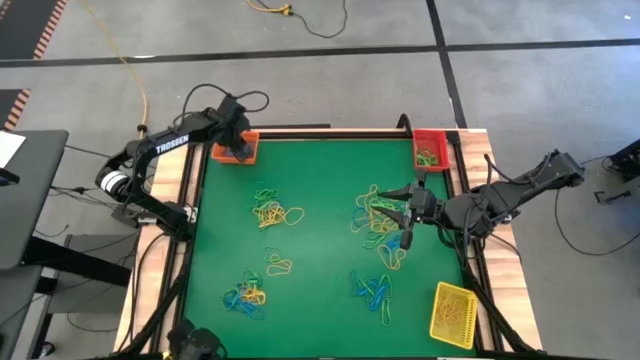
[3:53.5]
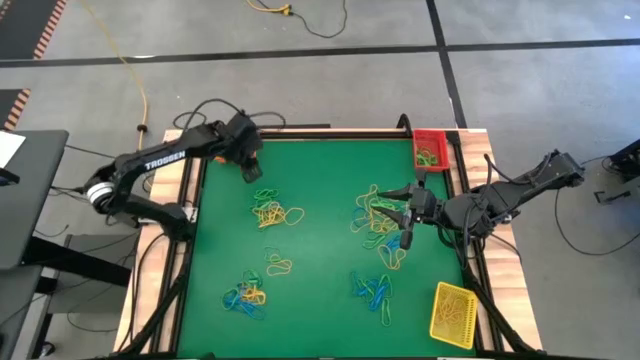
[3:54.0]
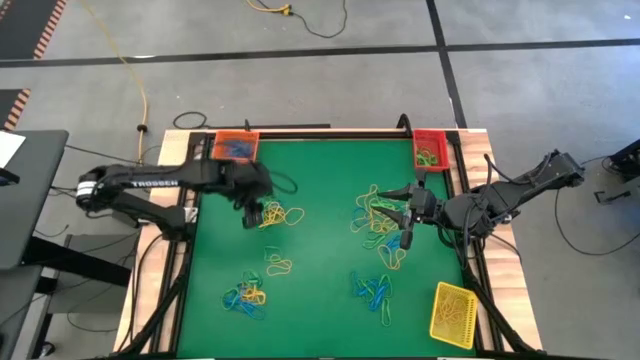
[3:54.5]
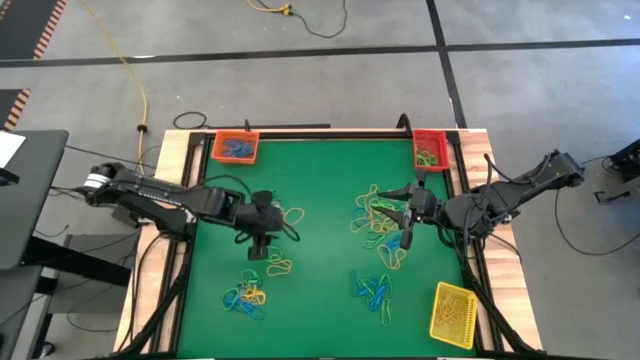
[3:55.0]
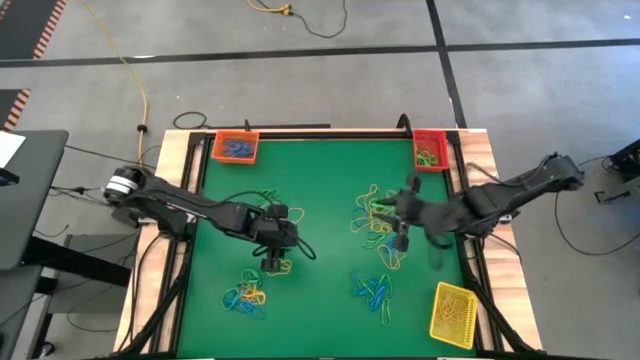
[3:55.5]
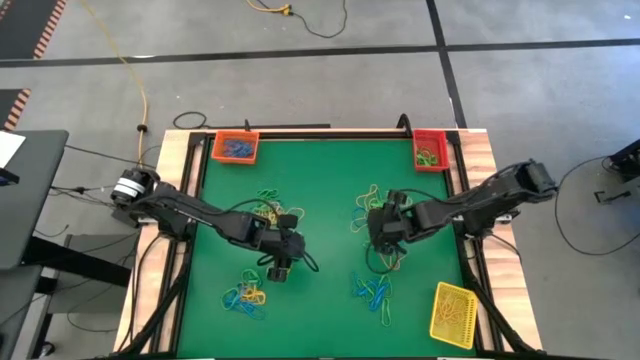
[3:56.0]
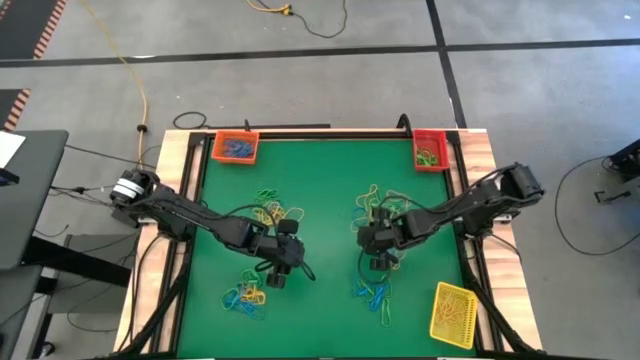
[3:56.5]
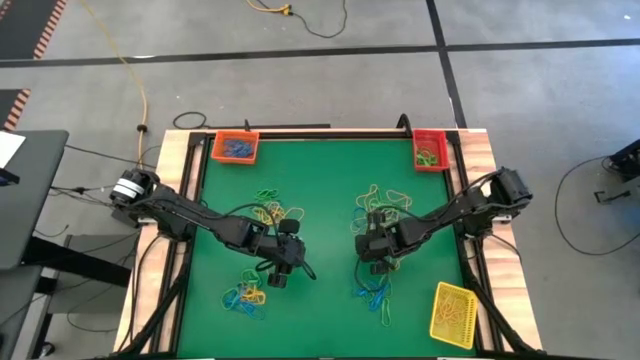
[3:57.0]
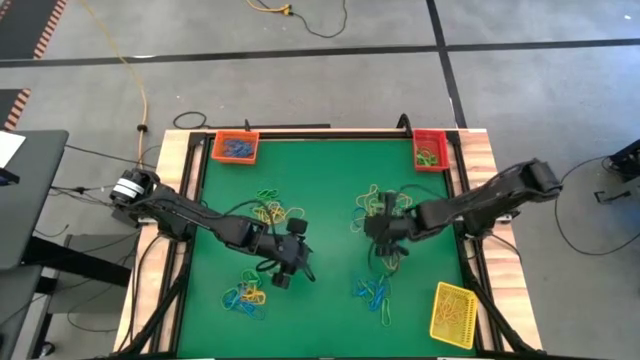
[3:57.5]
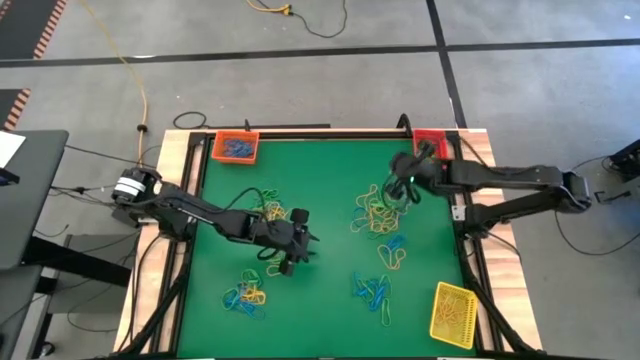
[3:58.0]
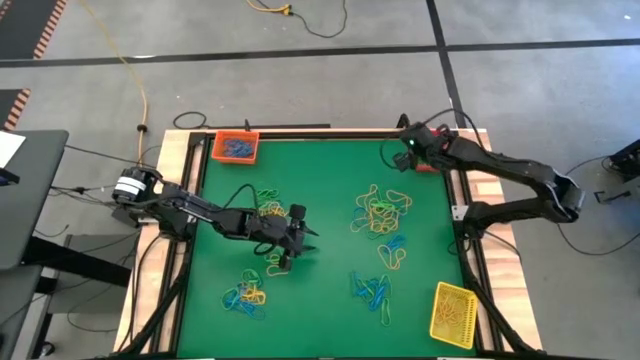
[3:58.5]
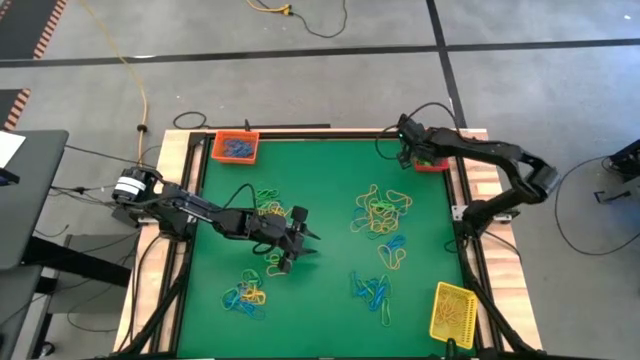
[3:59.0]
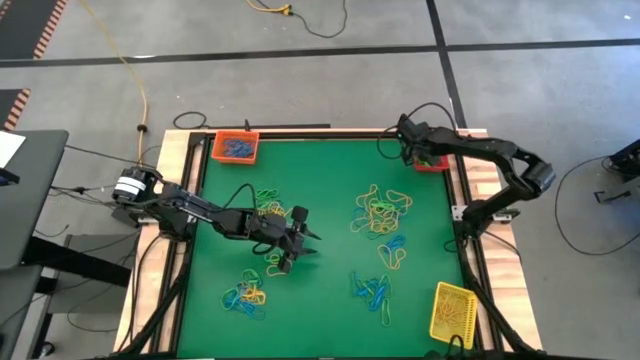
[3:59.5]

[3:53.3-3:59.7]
Task: Sort rubber bands into baskets
Put the bottom right green rubber band into the red bin

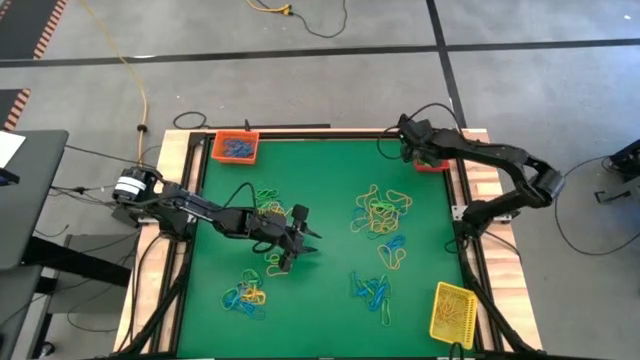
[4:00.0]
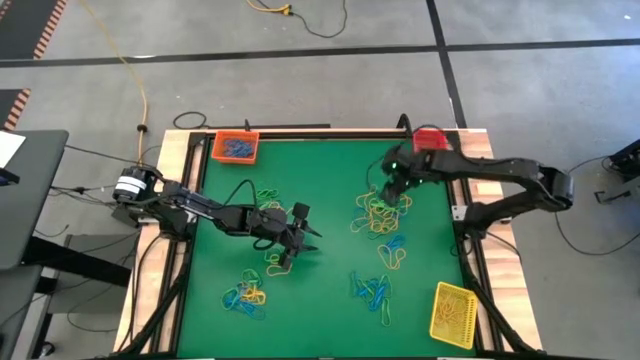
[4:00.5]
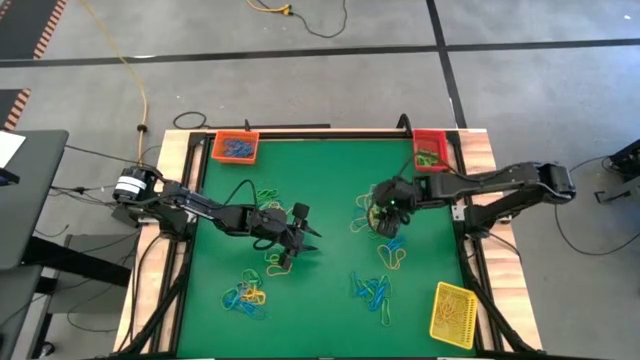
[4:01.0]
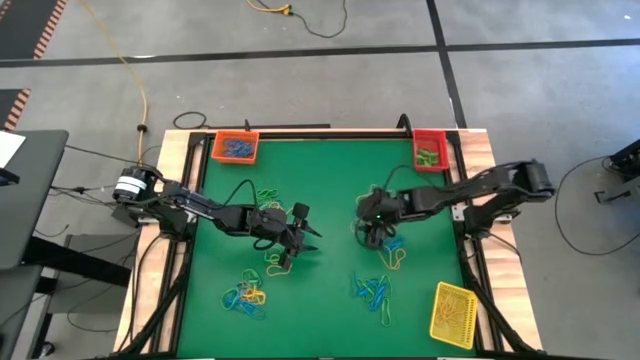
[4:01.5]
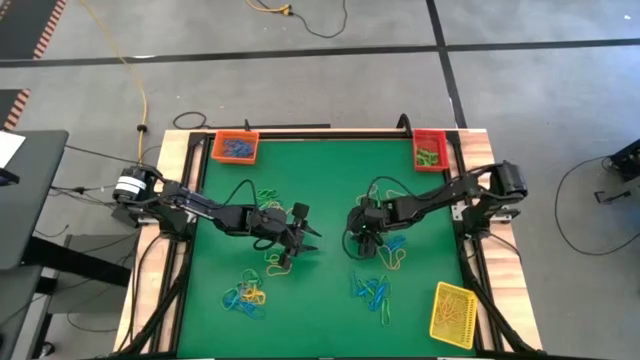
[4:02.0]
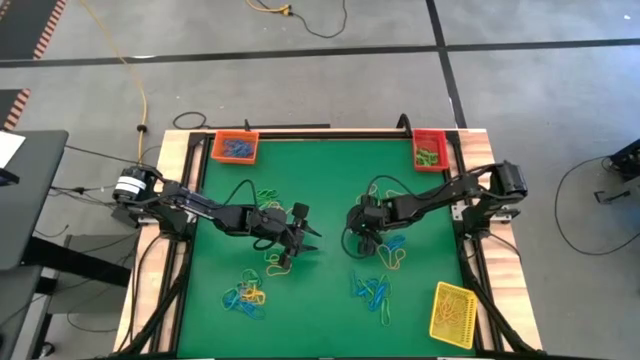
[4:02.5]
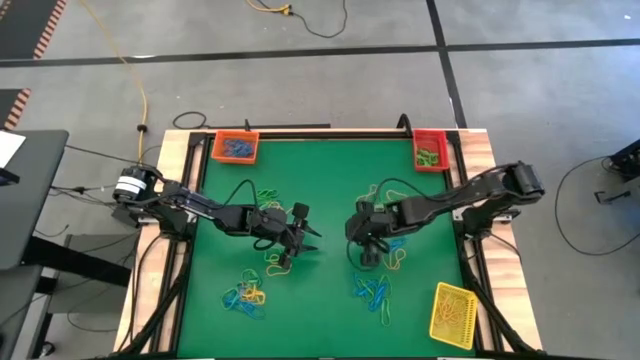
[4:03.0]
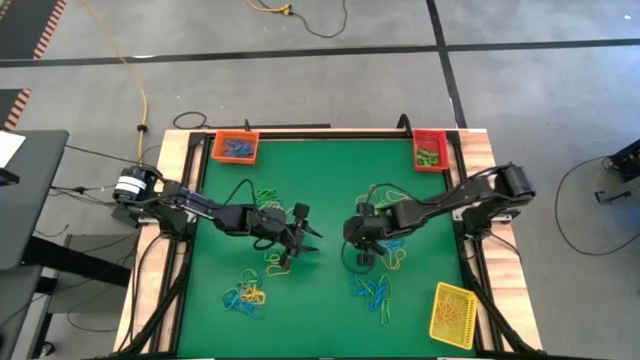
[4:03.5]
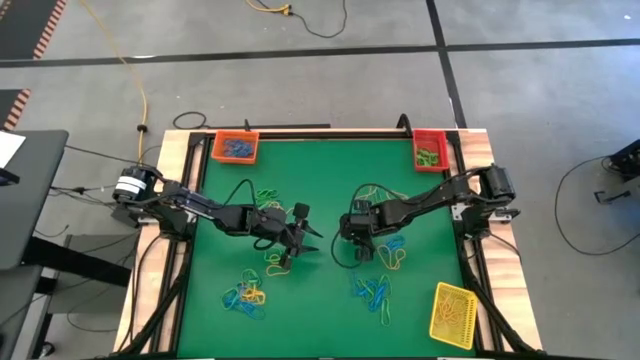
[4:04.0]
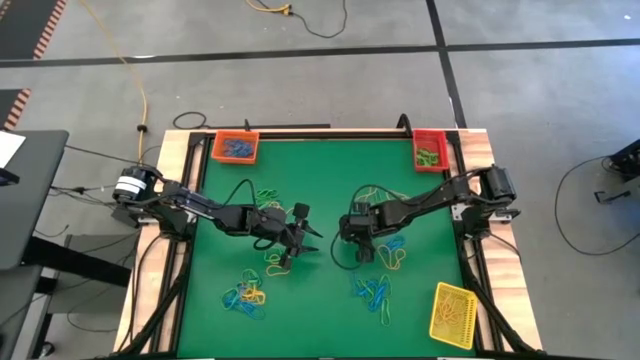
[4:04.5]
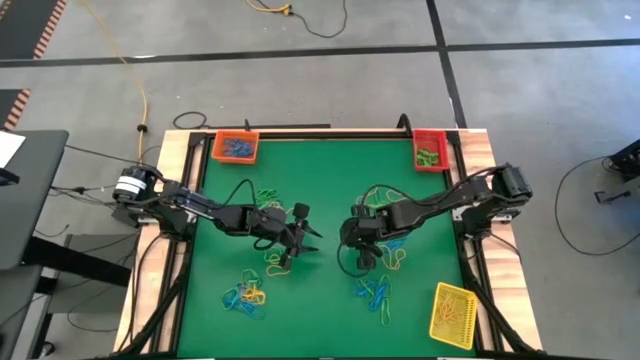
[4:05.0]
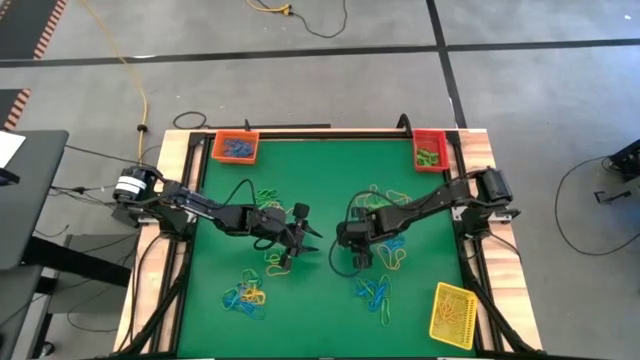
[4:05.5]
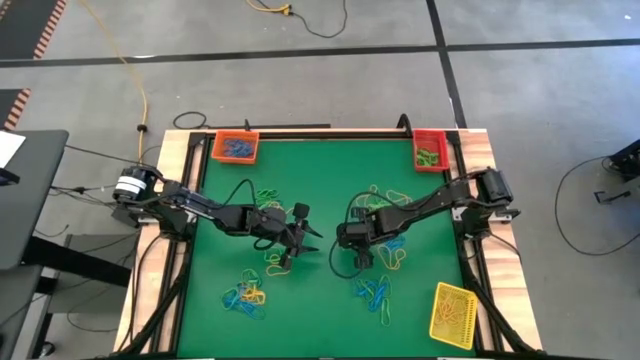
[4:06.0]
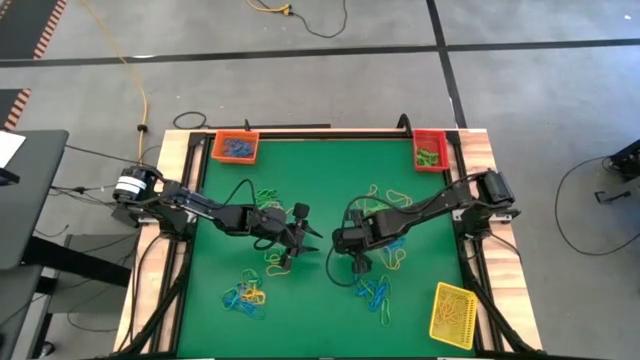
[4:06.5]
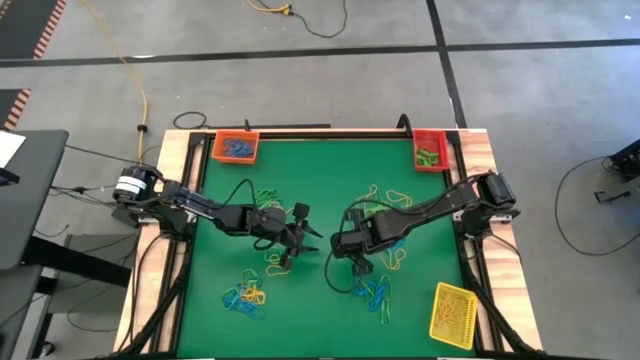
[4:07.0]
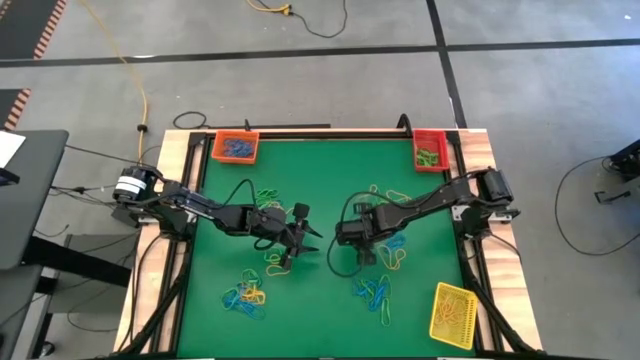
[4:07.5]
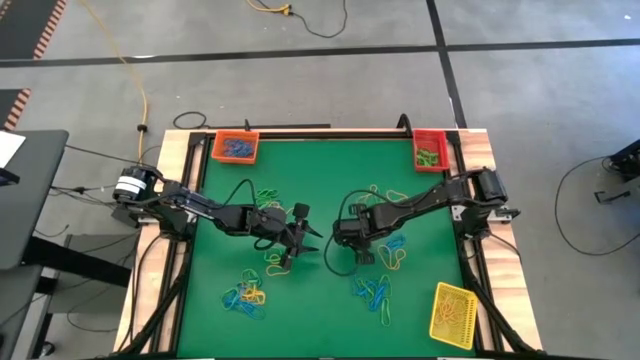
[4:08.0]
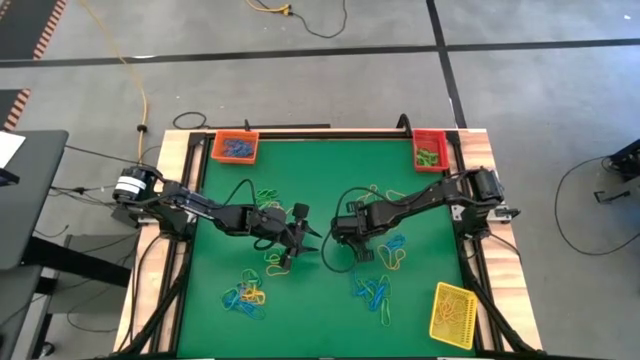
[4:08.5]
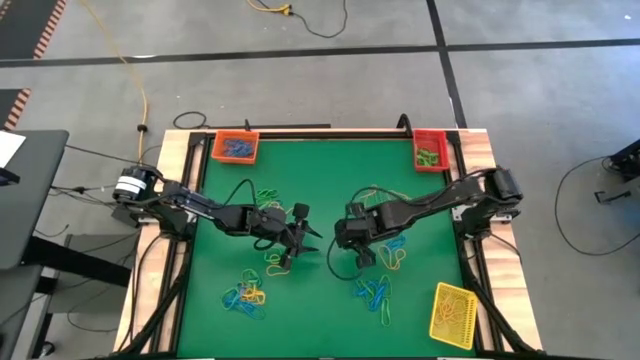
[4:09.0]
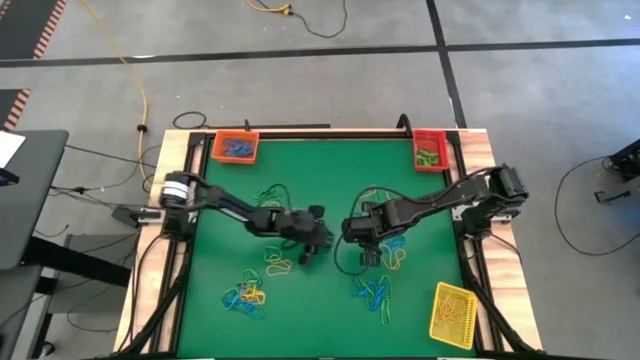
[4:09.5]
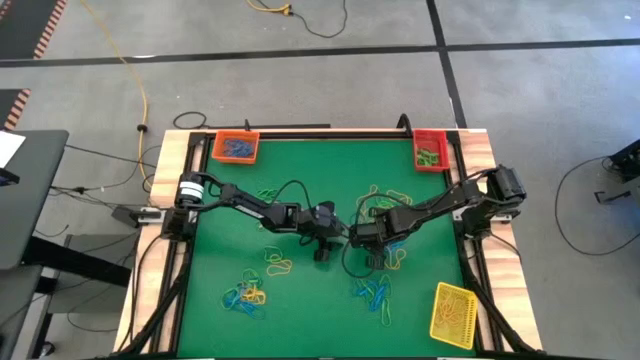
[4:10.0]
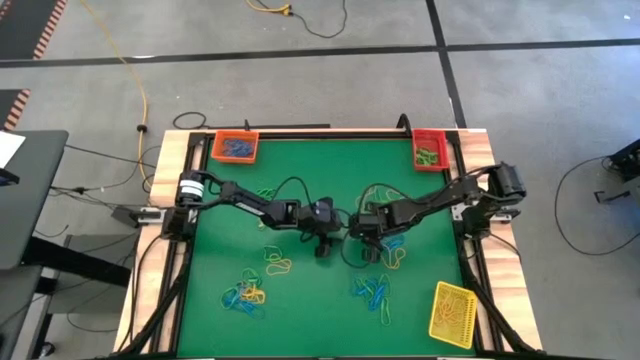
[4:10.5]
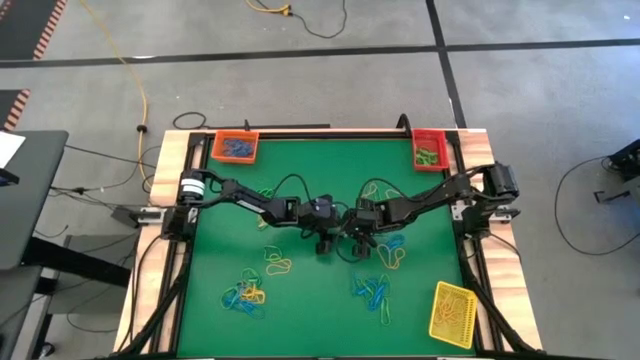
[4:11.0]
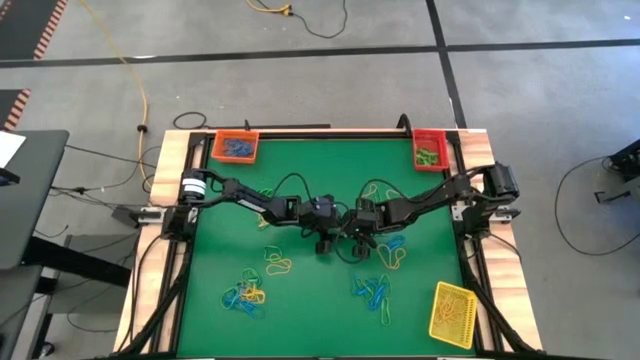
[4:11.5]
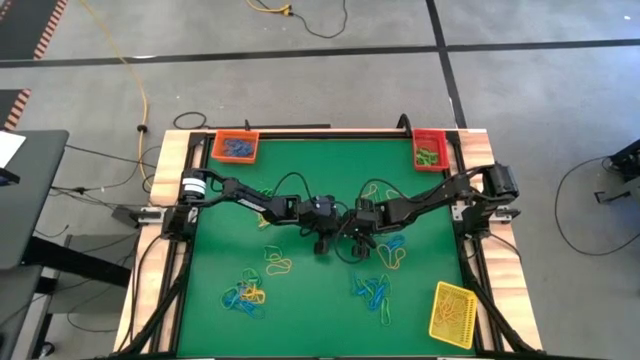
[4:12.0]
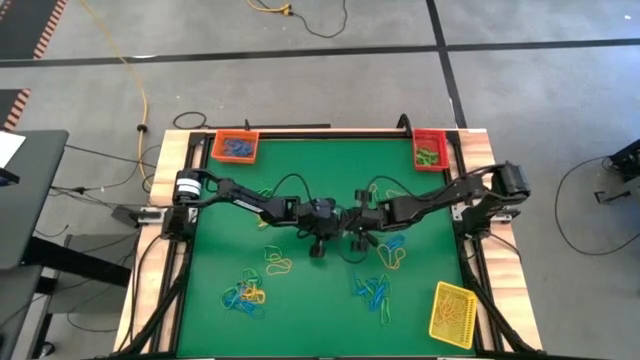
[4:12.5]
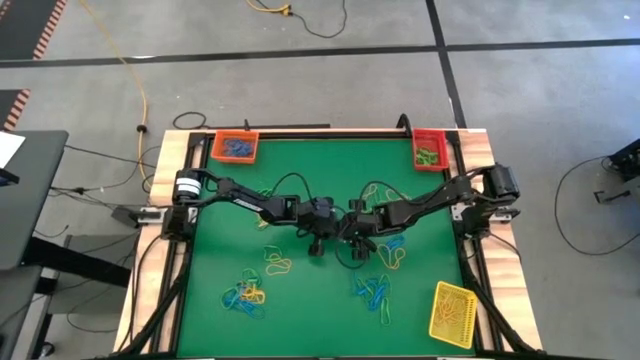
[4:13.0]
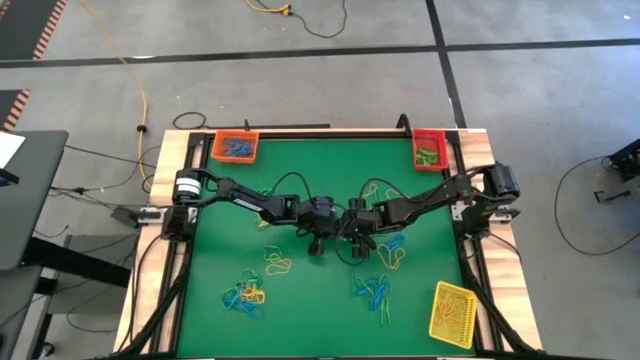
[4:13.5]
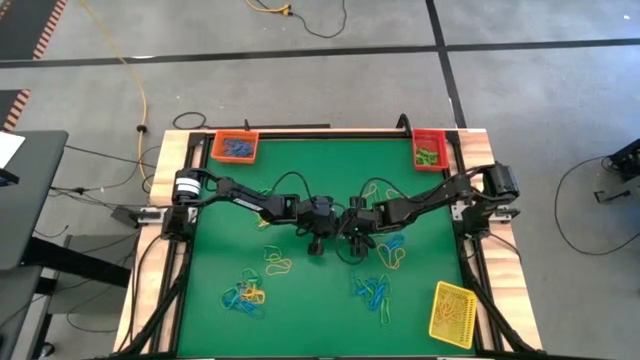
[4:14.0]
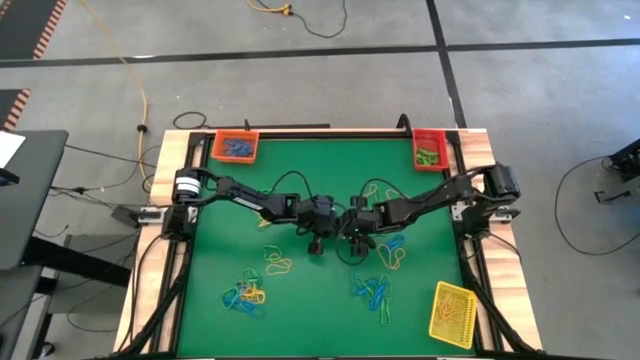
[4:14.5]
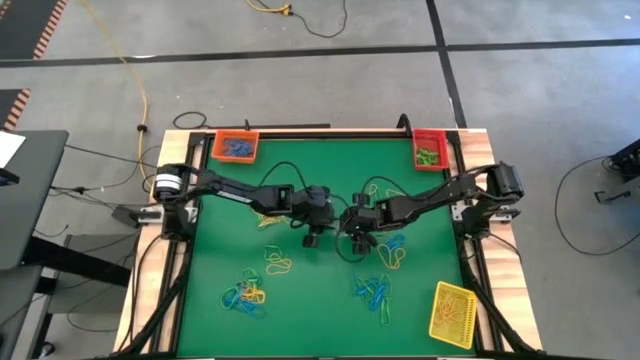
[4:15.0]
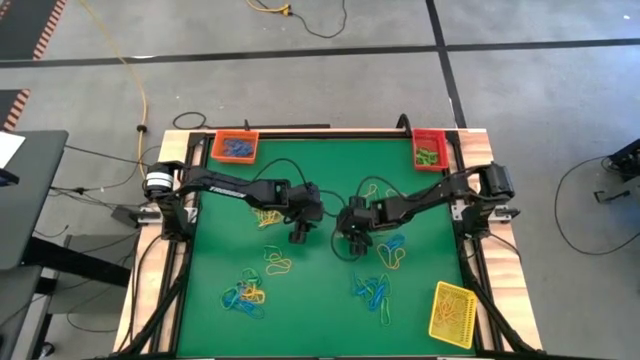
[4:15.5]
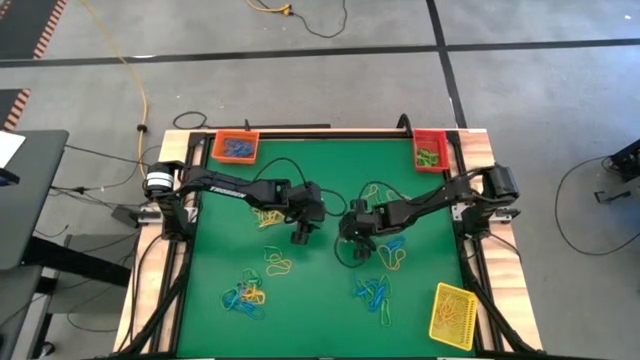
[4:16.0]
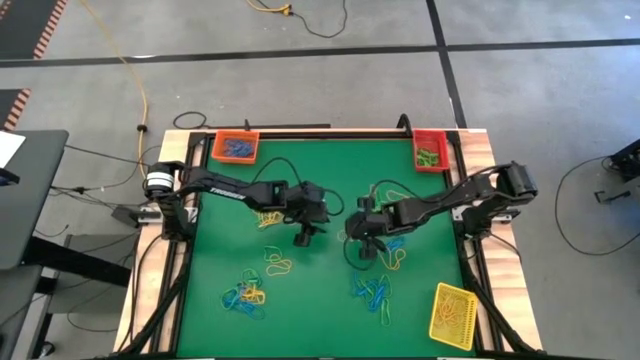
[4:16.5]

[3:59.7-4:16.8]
Put the top right yellow rubber band into the yellow bin
